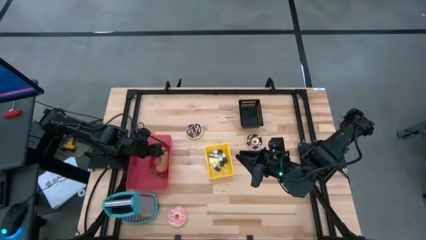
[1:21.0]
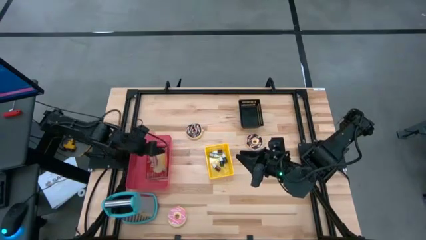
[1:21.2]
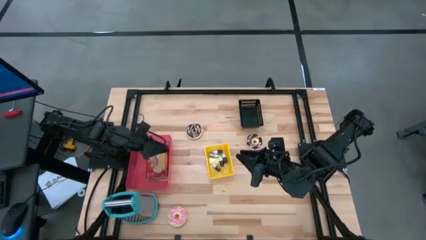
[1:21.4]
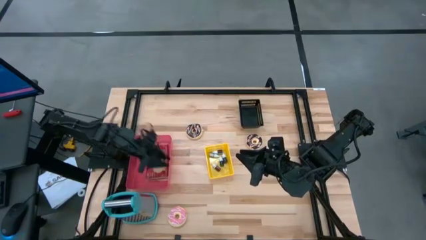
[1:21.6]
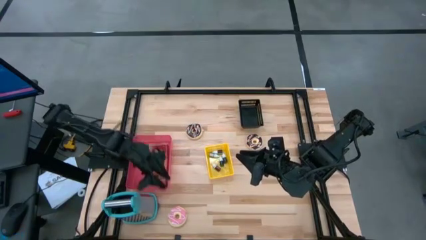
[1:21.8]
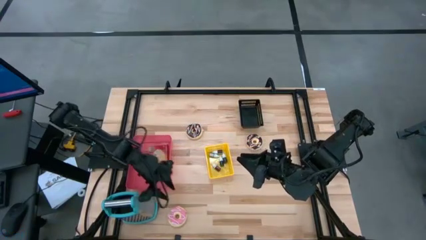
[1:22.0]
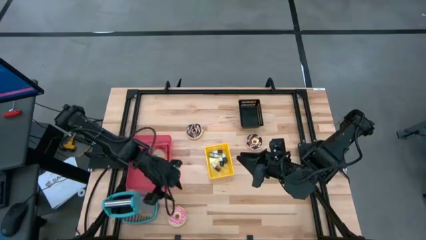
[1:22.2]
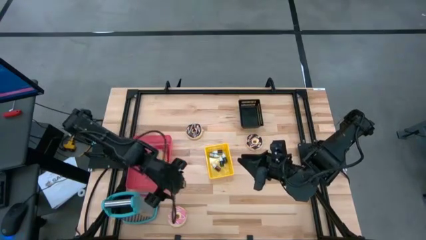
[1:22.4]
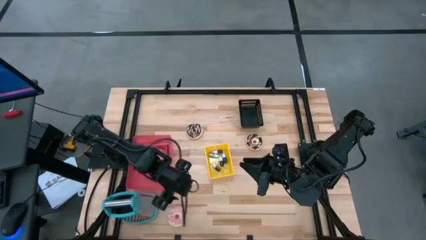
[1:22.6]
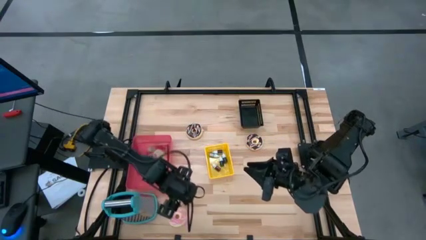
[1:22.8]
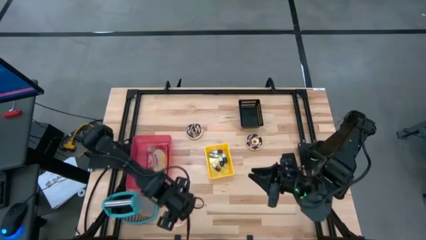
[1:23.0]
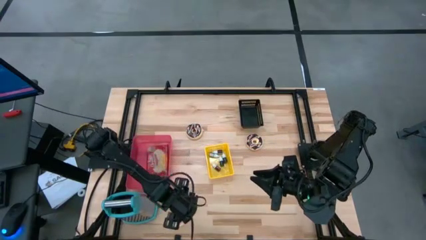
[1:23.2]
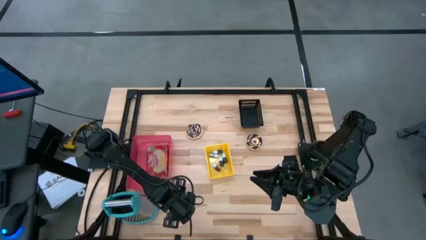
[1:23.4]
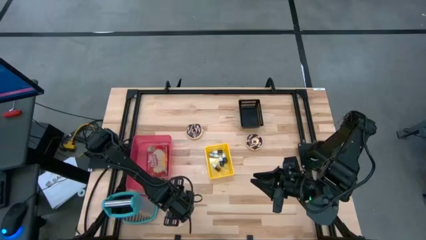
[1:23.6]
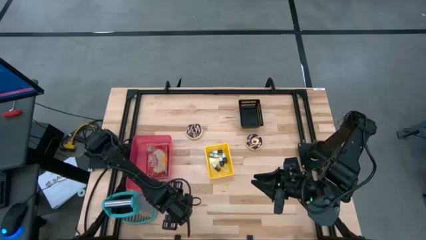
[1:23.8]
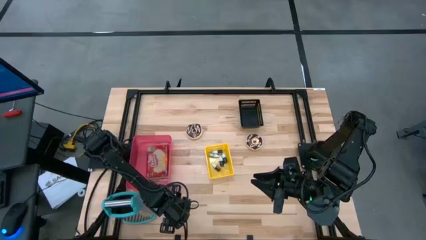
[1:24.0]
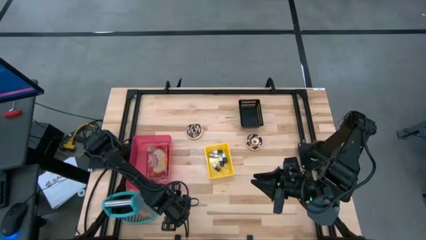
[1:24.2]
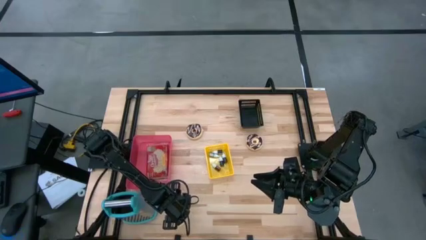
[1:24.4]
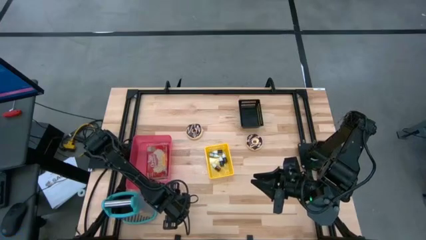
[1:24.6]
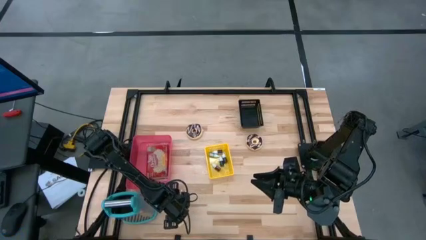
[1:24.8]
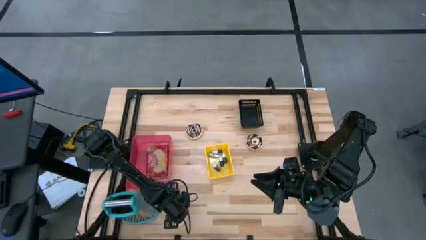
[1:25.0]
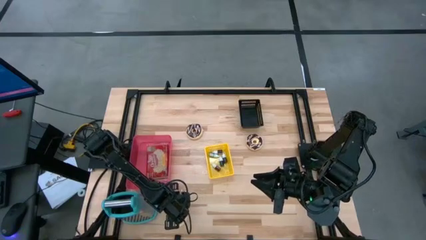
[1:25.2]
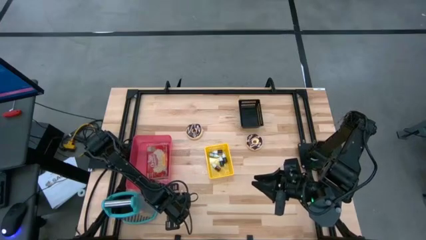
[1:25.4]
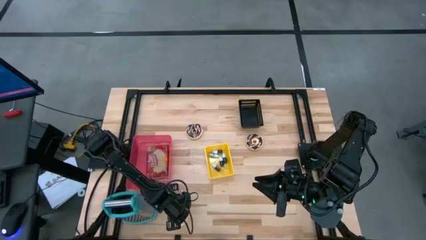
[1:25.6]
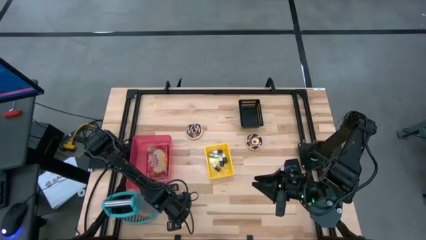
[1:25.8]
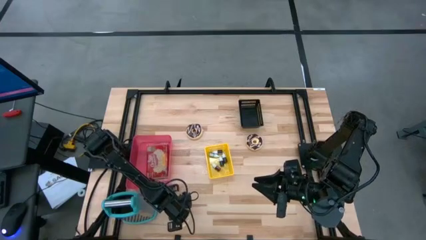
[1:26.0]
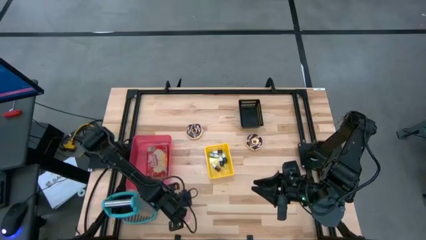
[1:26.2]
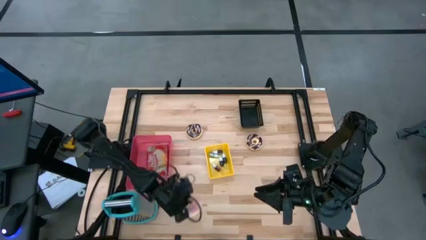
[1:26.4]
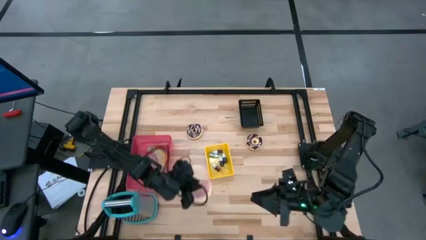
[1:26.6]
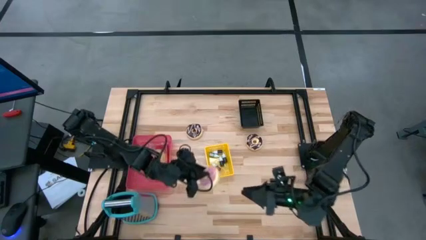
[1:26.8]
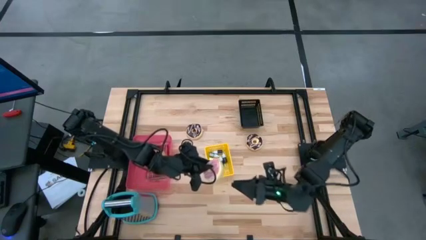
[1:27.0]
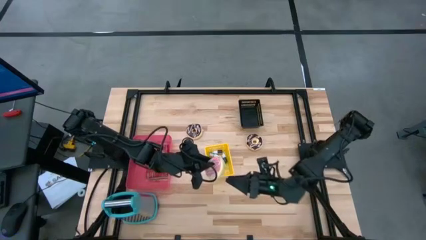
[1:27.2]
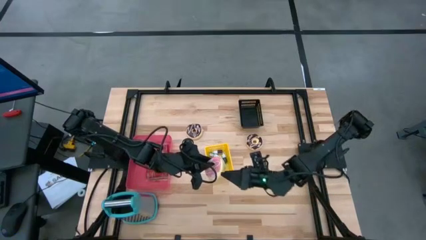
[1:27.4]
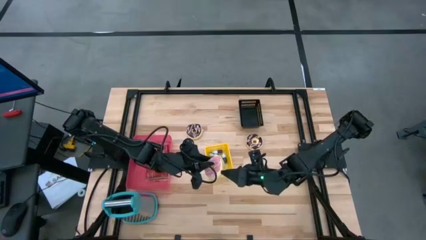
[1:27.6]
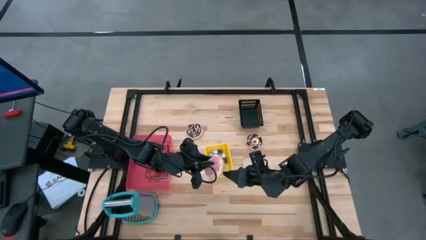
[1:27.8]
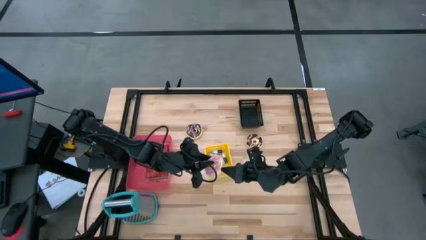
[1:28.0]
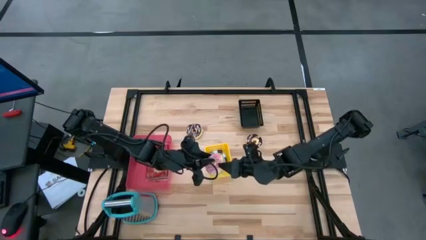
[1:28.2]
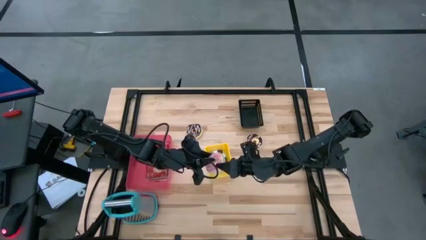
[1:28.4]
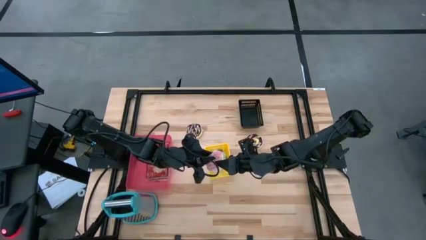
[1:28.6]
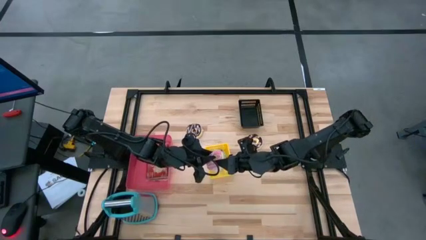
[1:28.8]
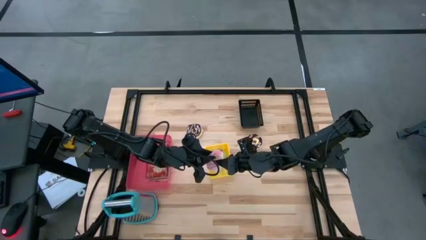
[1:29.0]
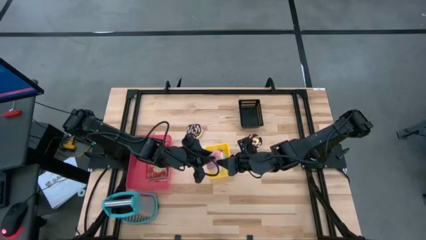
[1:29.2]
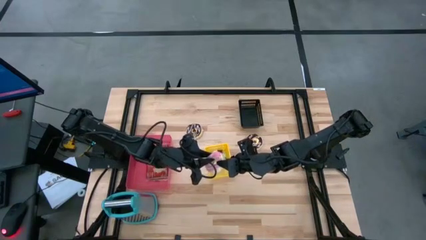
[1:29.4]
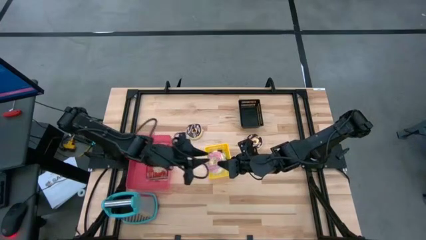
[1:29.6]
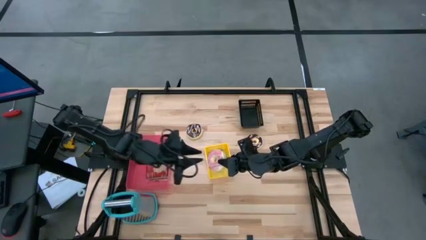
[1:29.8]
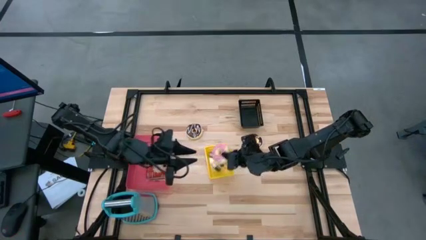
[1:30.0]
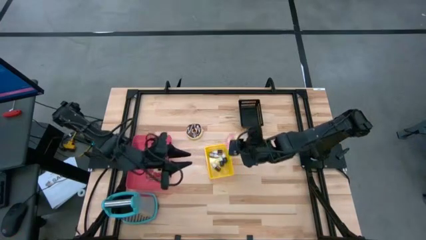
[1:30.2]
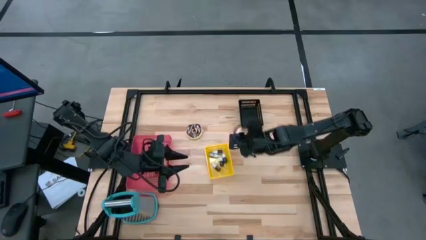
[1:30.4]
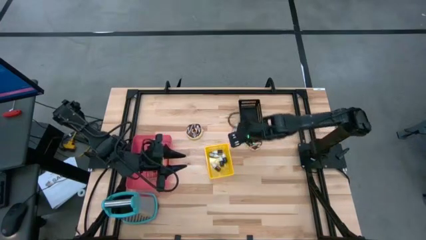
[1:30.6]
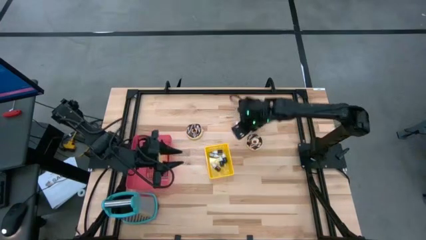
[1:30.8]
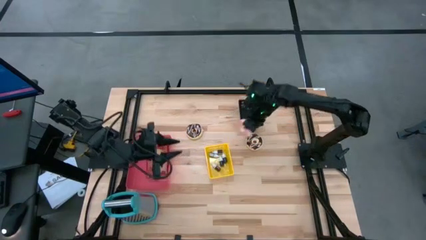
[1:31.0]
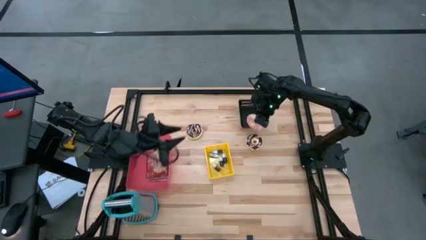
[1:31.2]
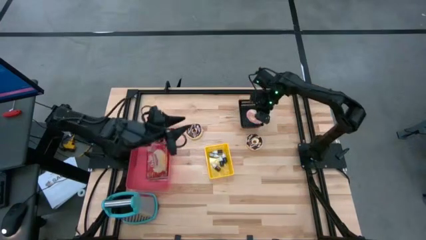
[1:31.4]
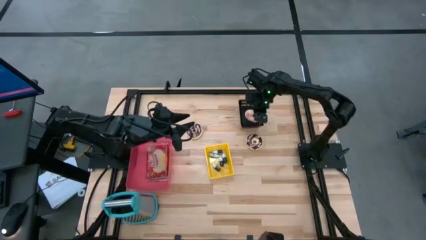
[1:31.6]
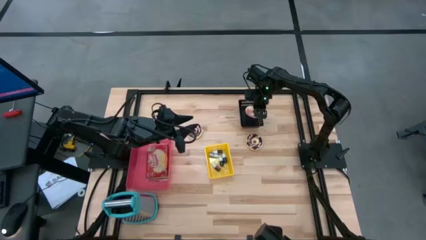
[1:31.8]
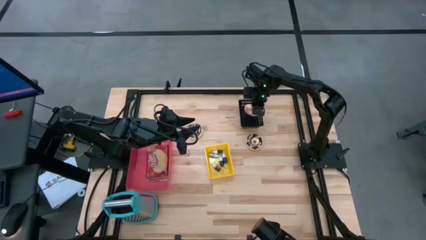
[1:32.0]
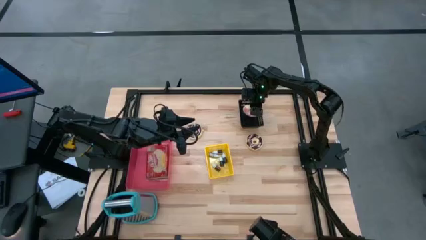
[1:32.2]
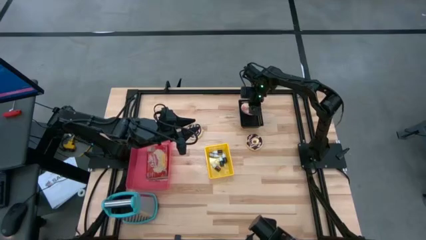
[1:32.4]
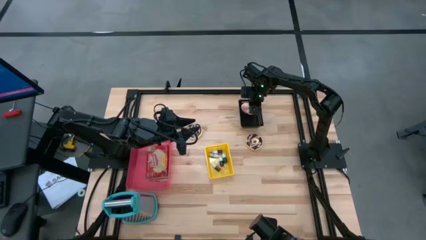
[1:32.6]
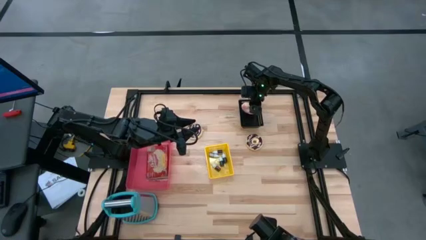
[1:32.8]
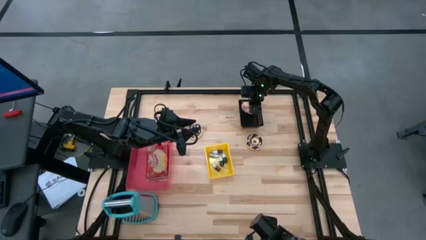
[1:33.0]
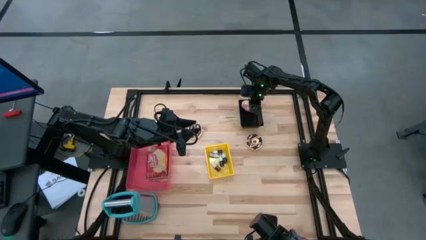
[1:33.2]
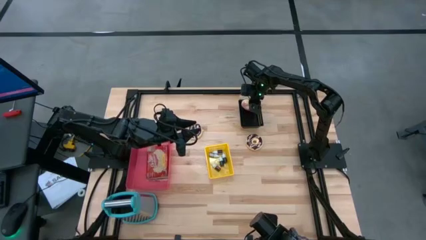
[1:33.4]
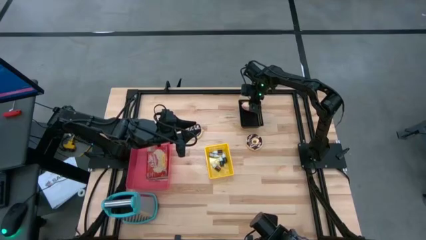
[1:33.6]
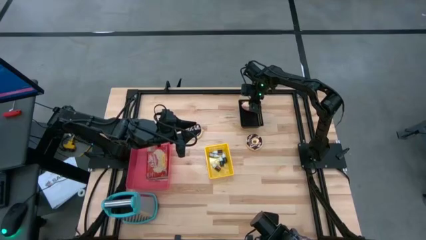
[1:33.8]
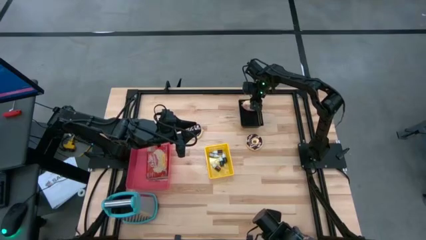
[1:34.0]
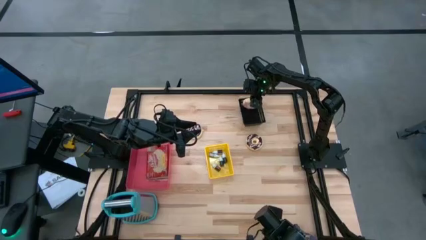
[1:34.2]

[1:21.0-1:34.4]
Put the pink donut into the black bin

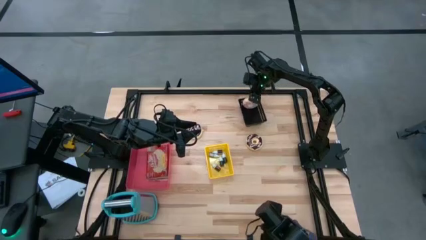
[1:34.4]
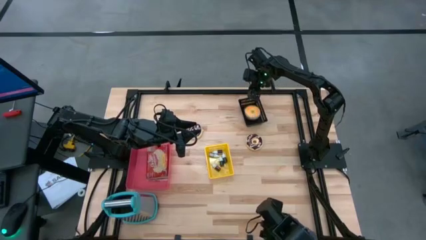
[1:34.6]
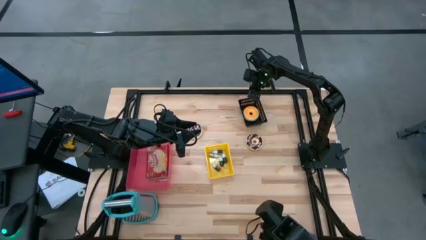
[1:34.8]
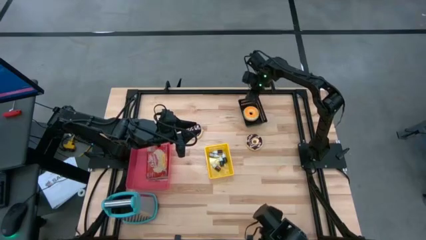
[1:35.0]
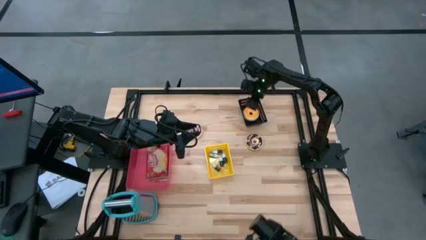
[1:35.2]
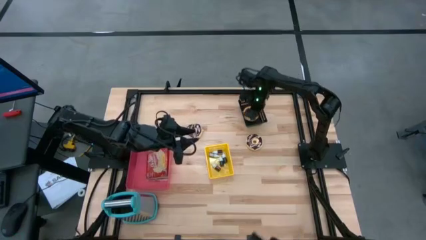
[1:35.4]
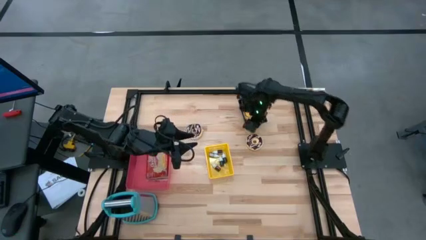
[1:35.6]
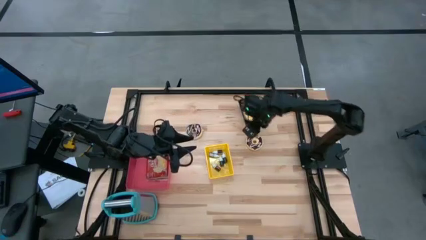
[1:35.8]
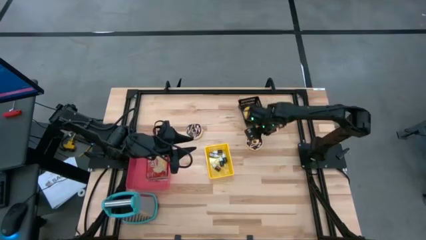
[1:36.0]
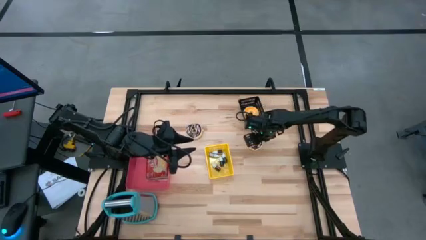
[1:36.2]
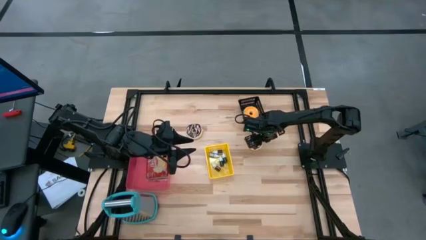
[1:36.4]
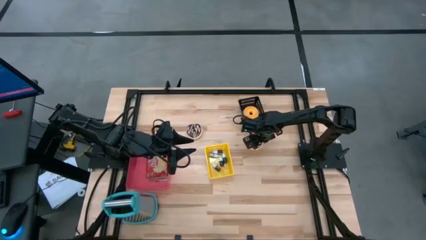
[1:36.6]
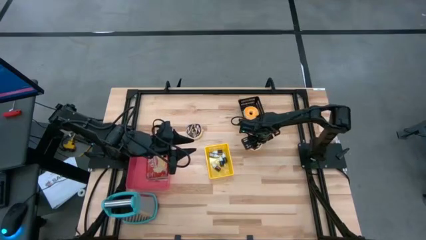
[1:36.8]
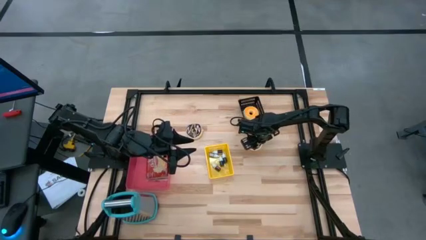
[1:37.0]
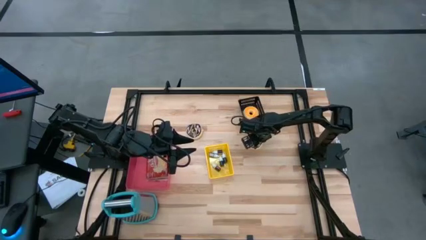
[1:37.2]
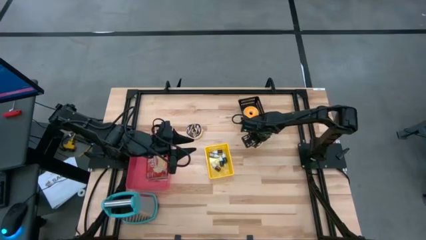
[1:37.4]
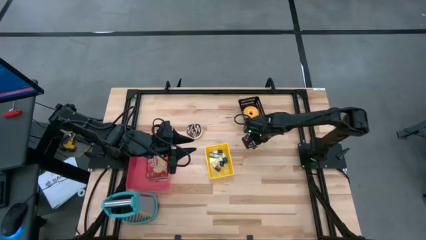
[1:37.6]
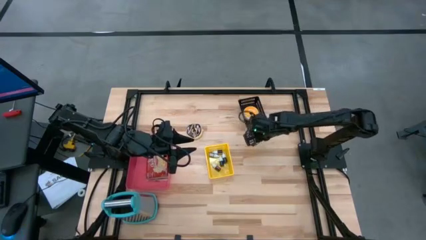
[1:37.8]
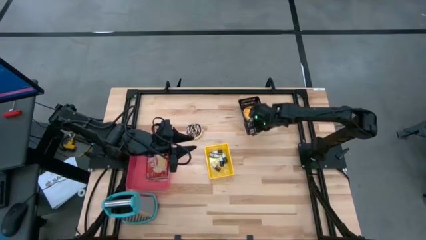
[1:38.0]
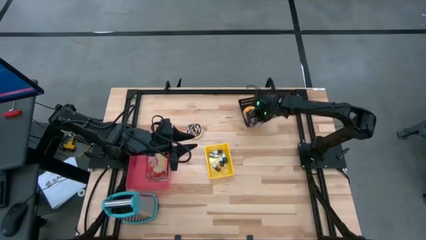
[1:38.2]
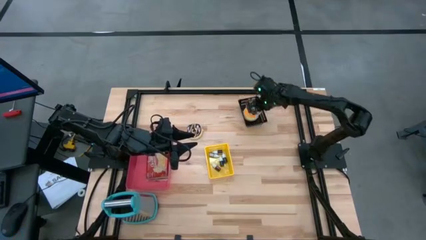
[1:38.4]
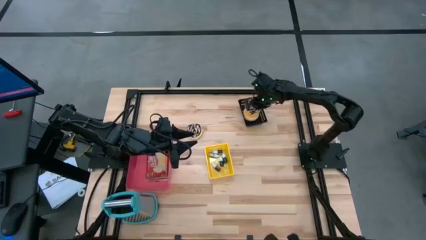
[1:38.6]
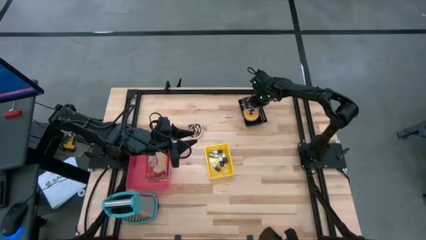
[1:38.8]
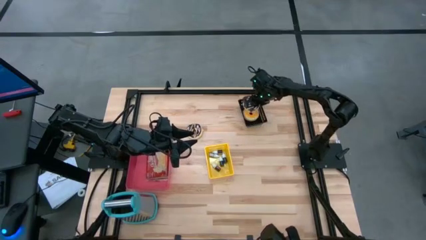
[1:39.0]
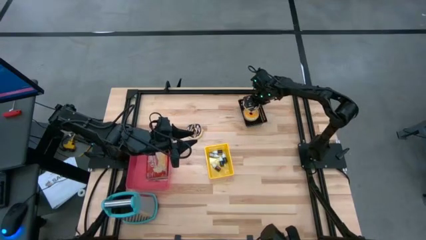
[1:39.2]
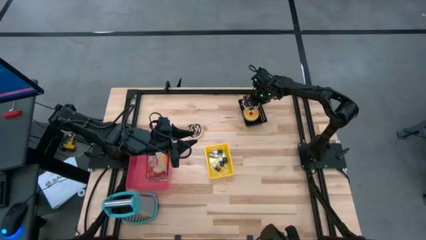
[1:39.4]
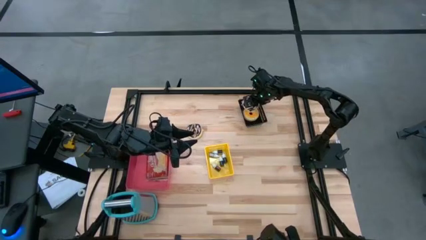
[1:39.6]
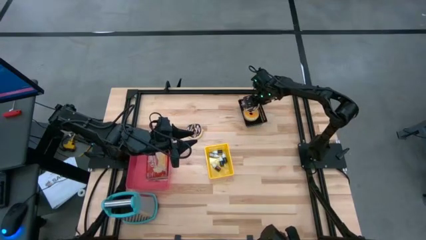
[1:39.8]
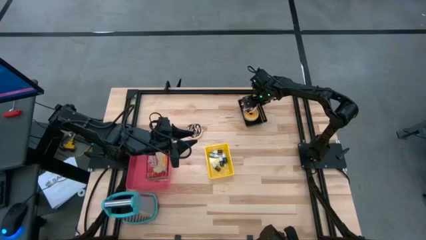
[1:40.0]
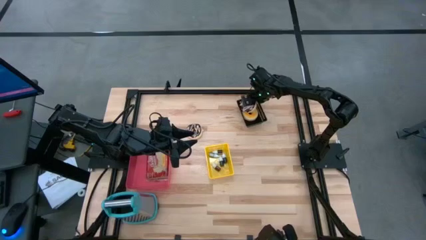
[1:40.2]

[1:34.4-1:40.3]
Put the right black donut into the black bin
